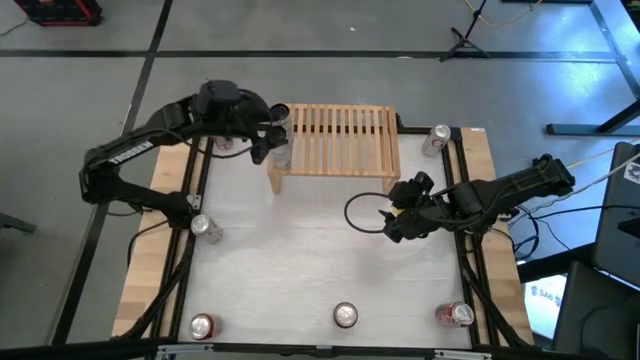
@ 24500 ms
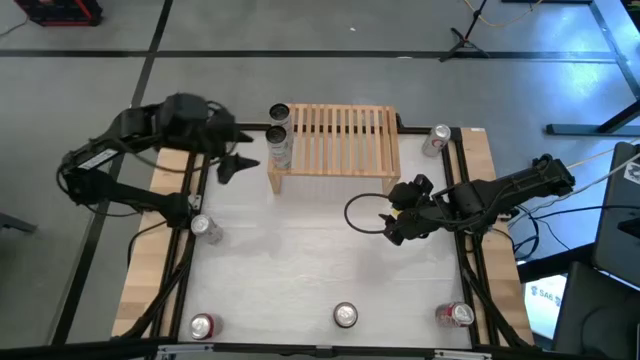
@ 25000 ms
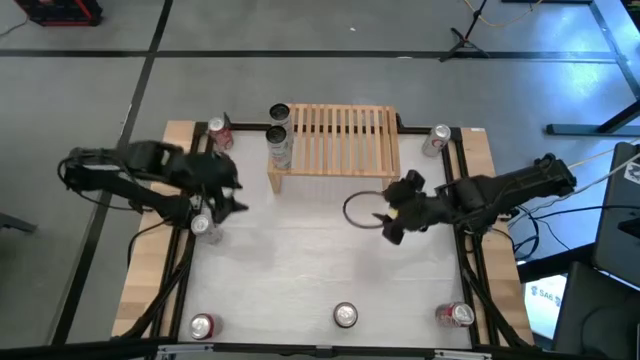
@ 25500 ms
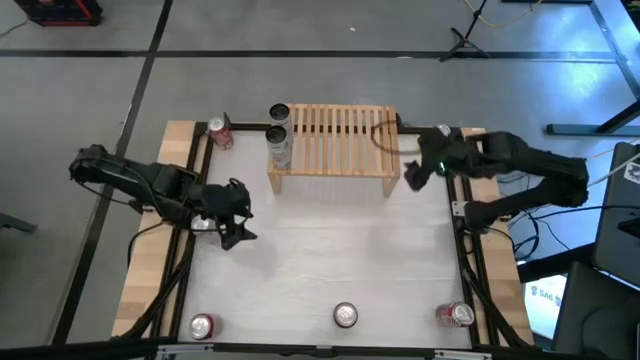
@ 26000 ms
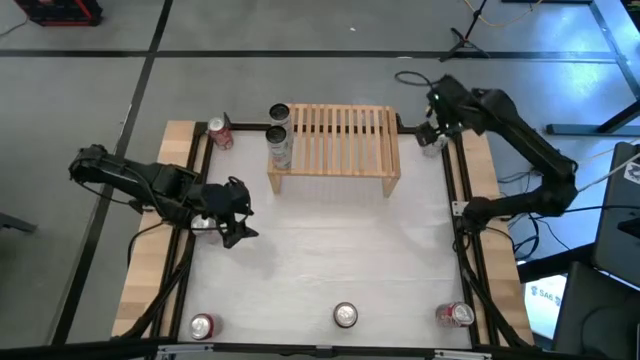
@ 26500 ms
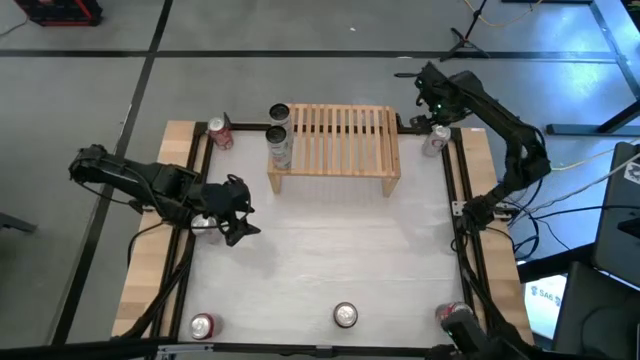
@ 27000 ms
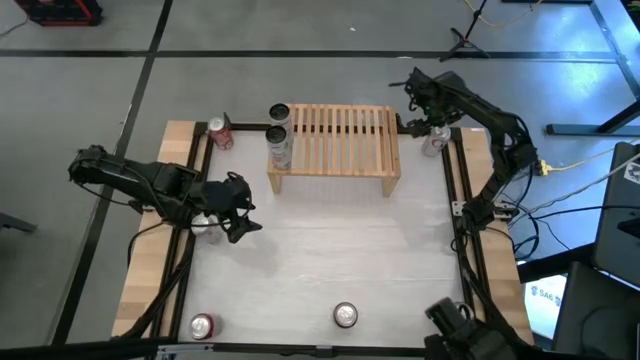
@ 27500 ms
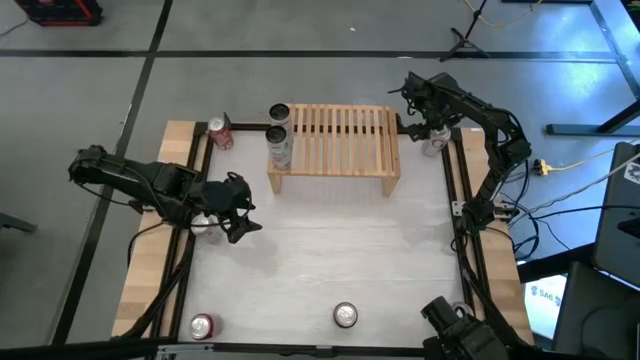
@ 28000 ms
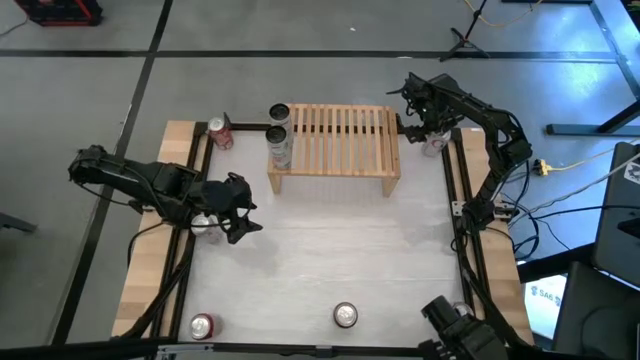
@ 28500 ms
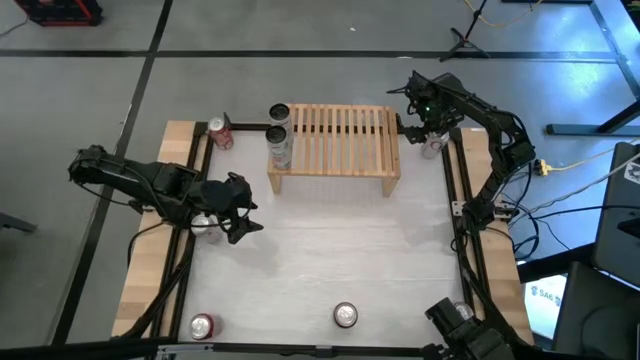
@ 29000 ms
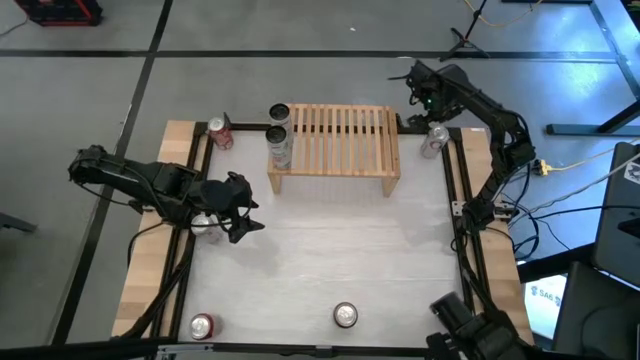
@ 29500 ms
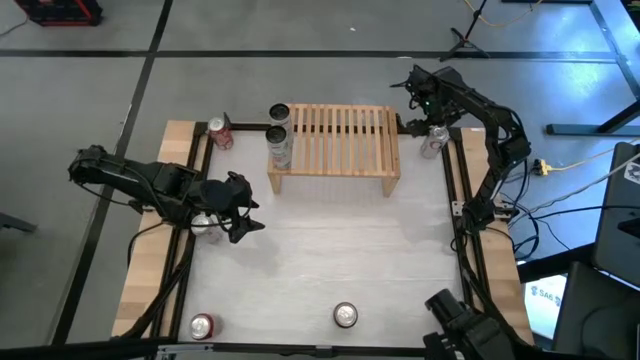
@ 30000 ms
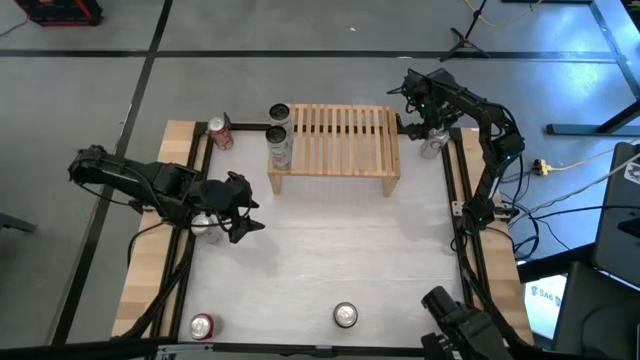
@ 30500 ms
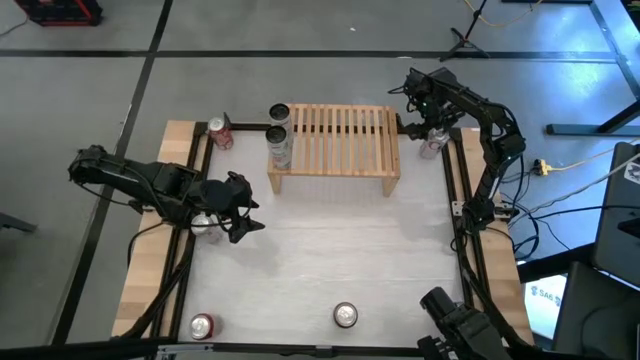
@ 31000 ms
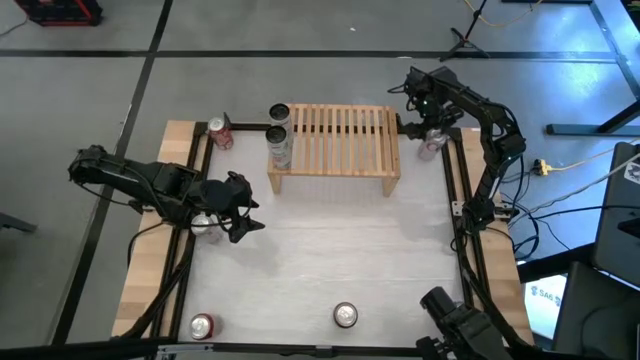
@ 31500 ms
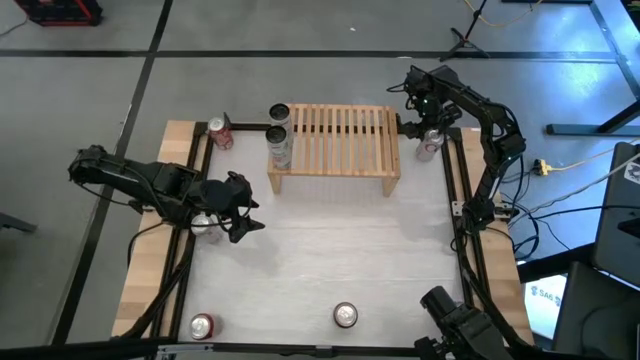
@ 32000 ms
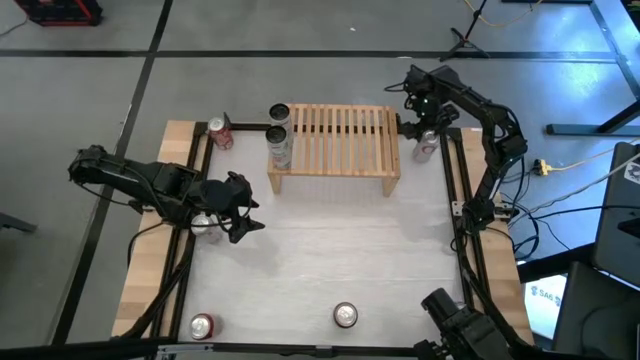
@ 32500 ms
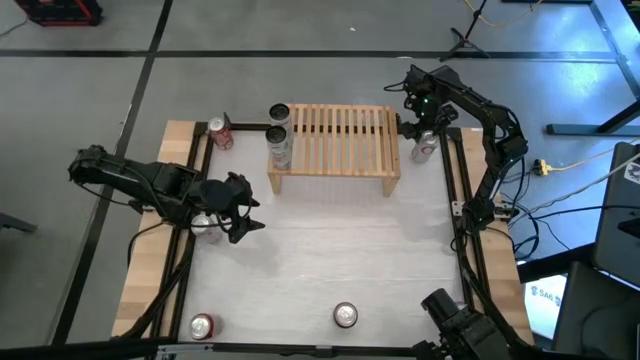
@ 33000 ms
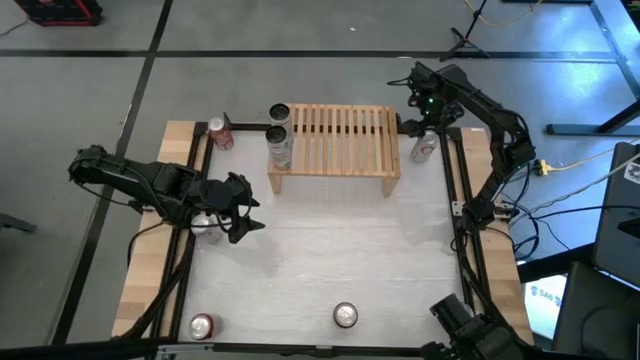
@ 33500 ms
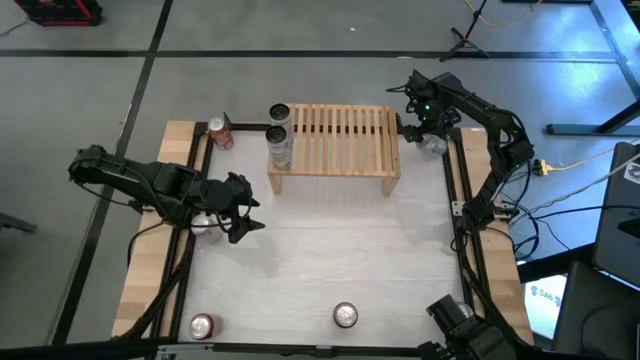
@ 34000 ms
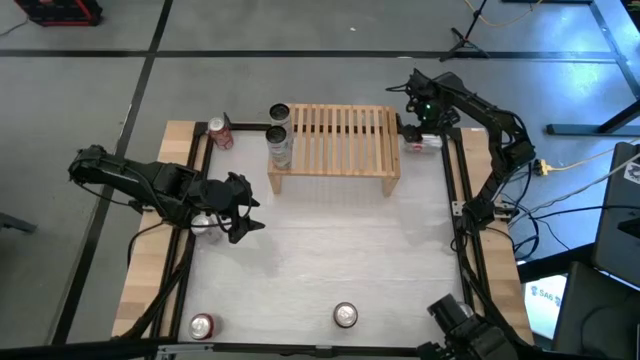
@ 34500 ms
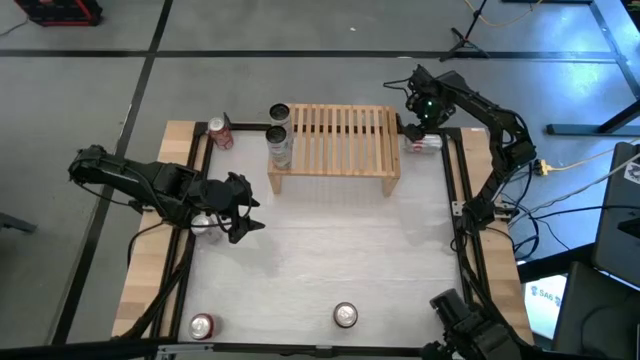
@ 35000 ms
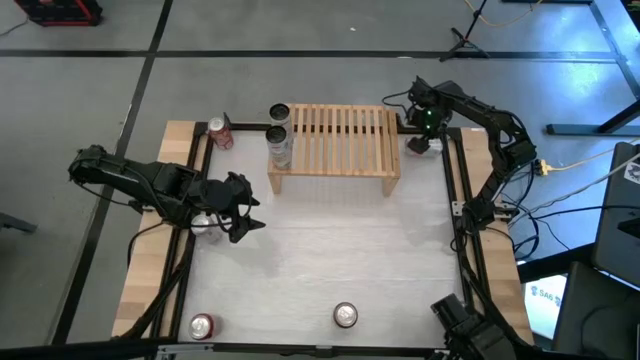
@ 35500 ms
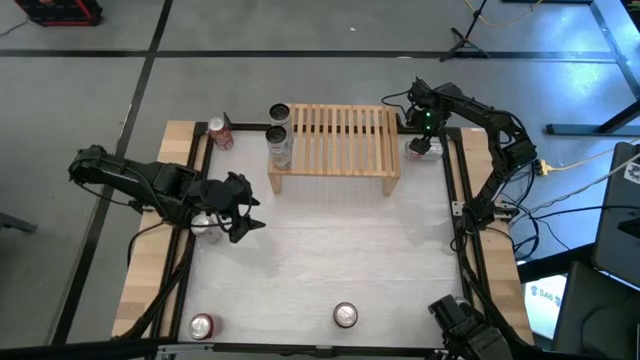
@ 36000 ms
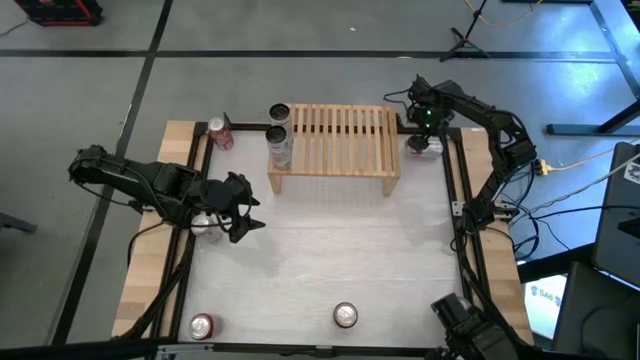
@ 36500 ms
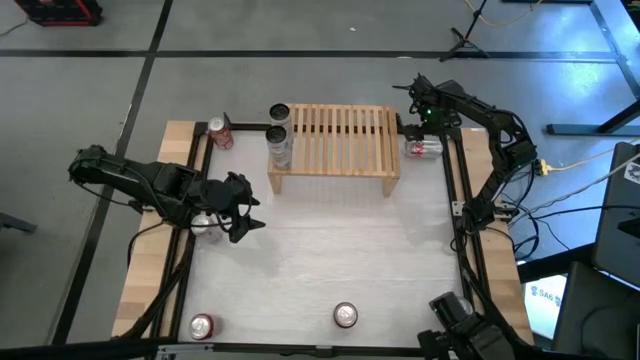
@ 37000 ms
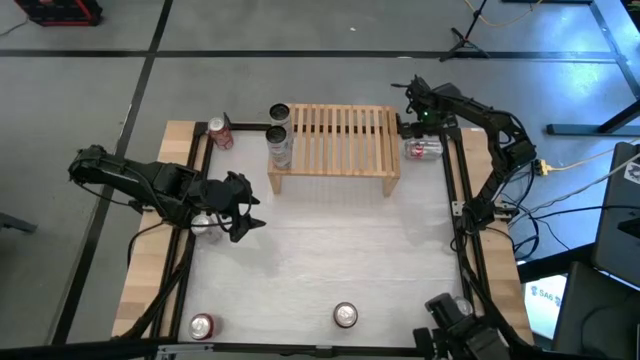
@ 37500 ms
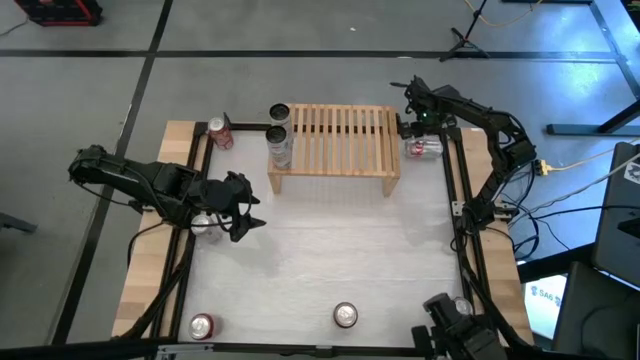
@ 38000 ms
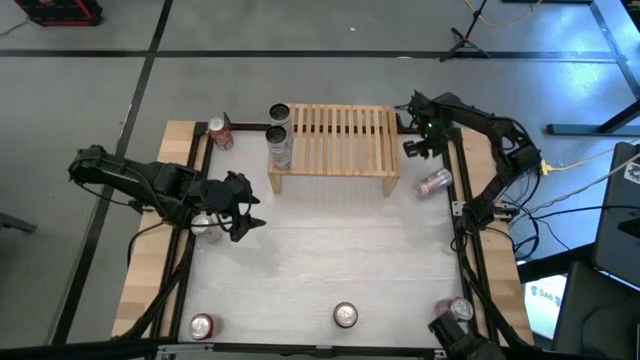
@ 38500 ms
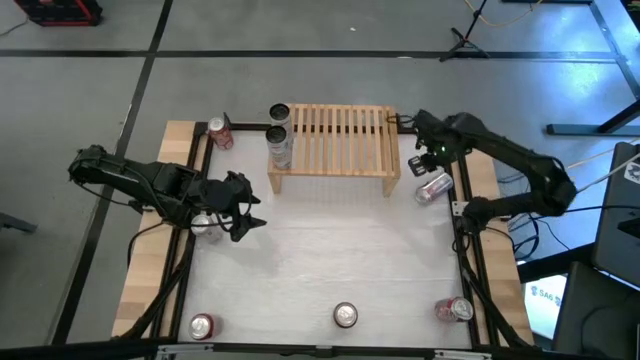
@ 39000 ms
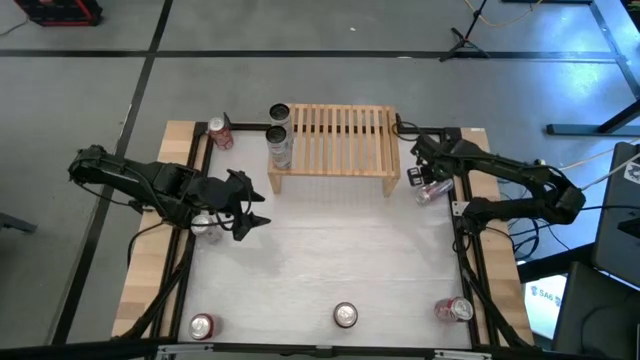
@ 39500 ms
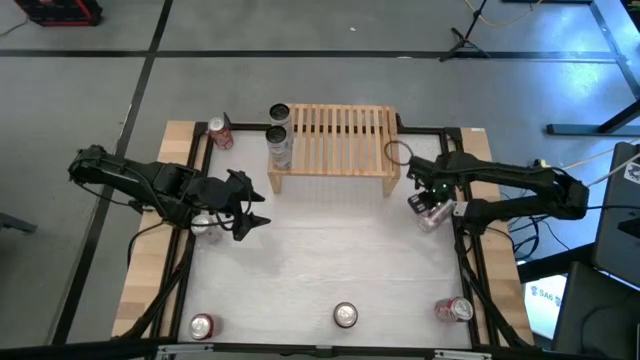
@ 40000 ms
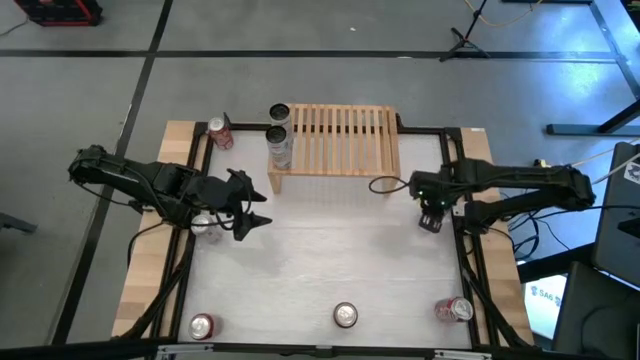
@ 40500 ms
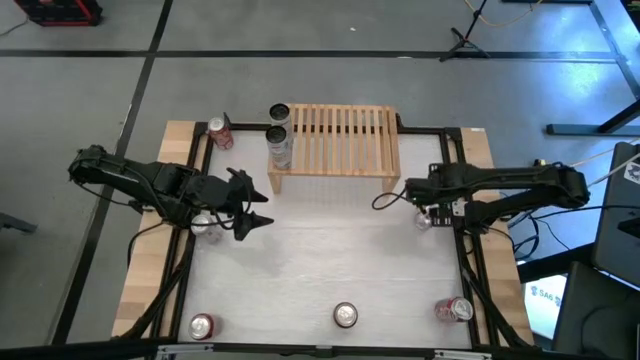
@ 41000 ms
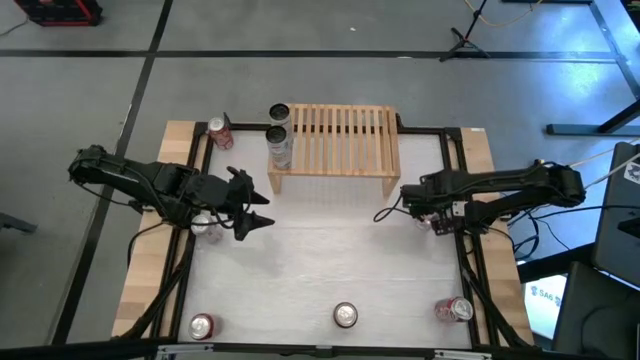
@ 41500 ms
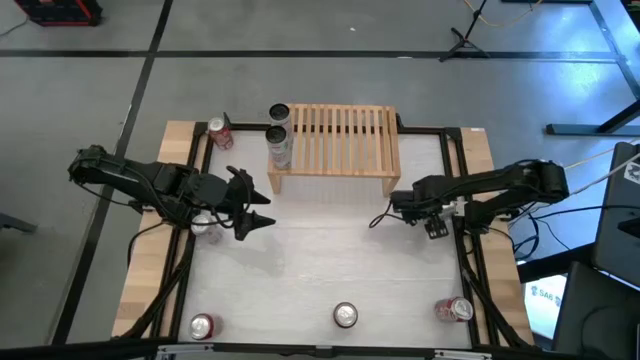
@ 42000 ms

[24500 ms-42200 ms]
Task: Place canned beverage on shelf
Put the silver soda can on the shelf

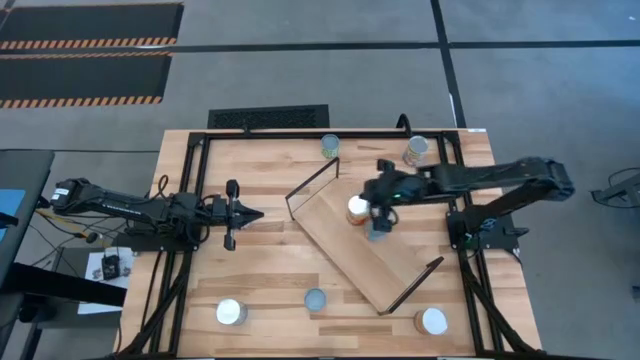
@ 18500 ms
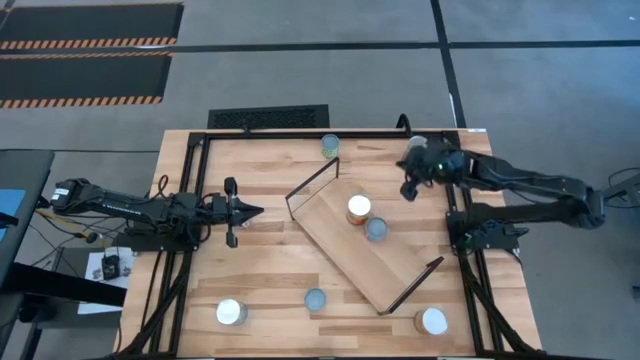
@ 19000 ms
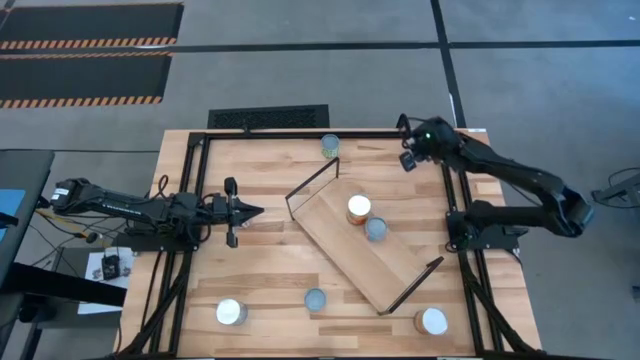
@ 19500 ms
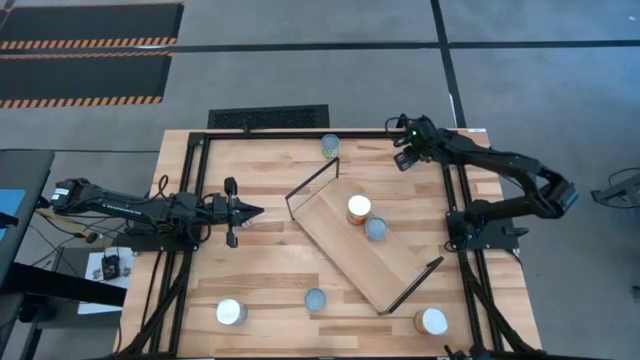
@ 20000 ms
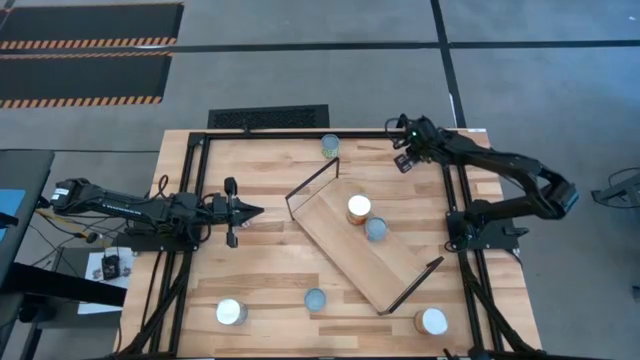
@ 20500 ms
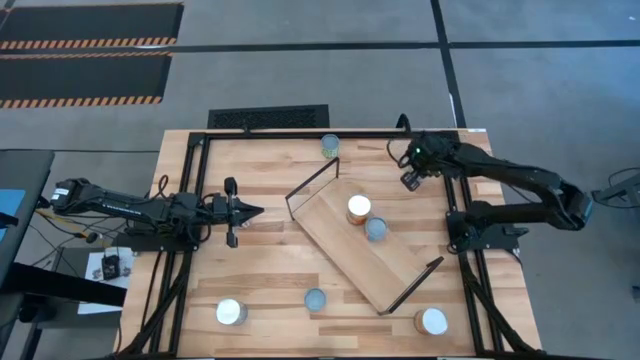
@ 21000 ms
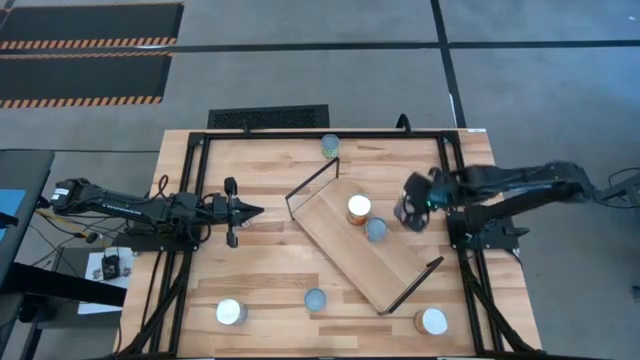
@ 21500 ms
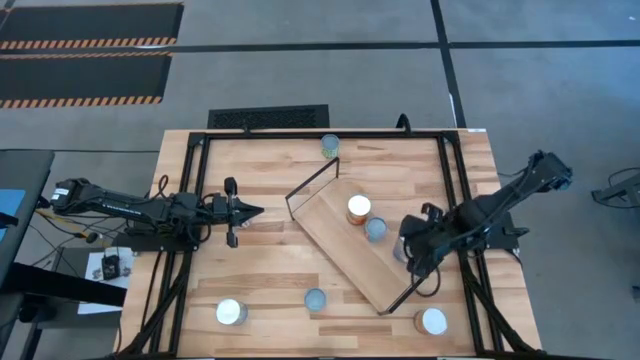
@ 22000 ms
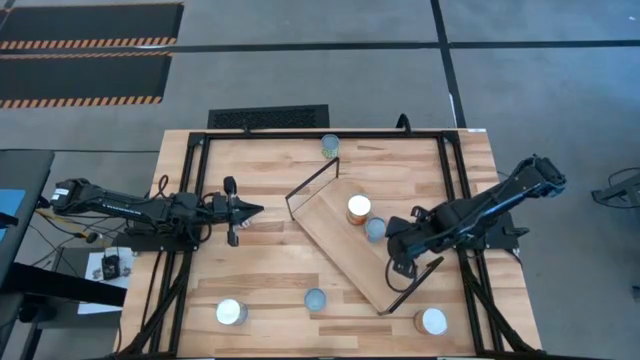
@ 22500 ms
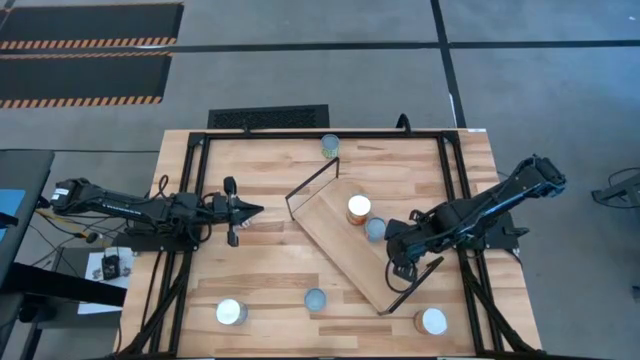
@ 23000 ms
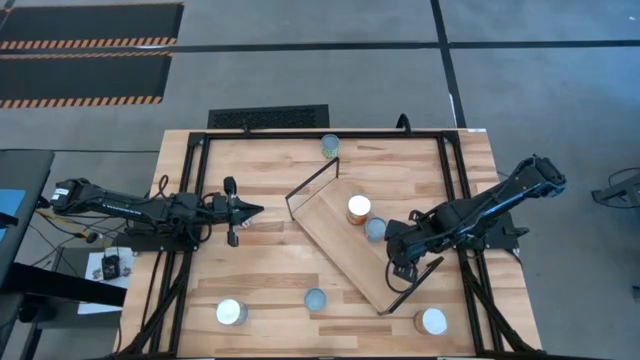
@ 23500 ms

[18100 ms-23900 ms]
Task: Pick and place cans onto a shelf
Put the top large canned peaches on the shelf
